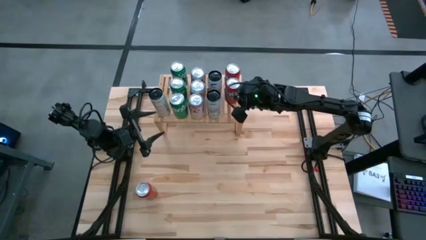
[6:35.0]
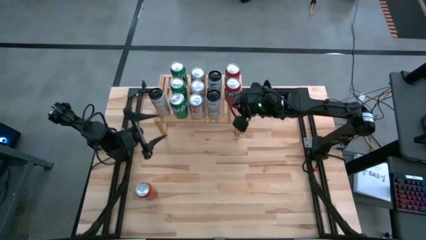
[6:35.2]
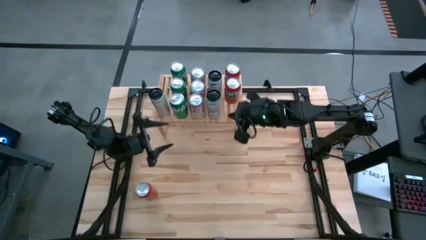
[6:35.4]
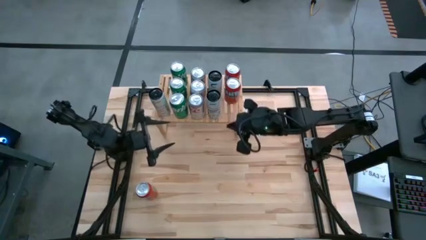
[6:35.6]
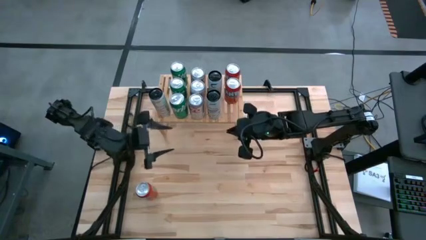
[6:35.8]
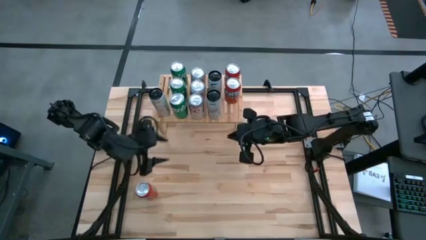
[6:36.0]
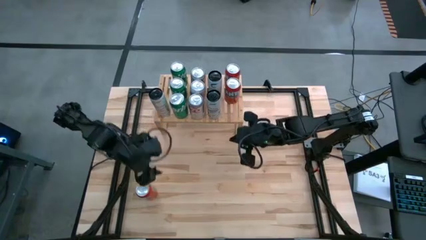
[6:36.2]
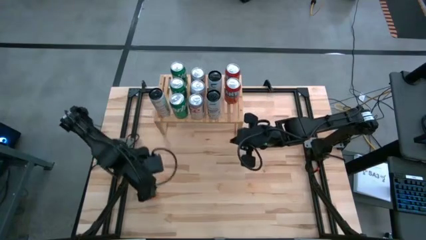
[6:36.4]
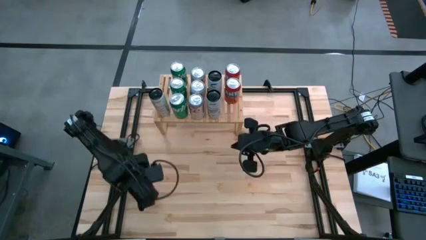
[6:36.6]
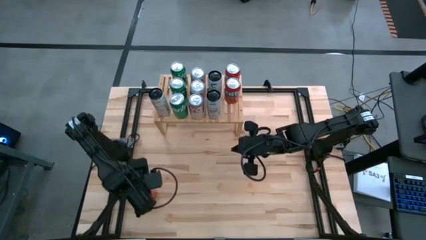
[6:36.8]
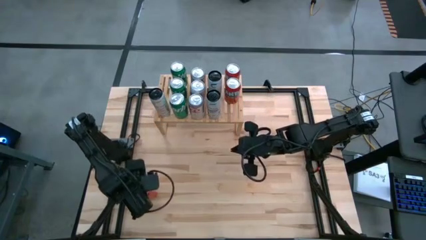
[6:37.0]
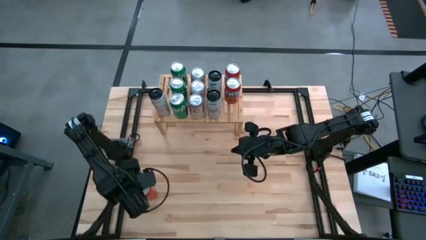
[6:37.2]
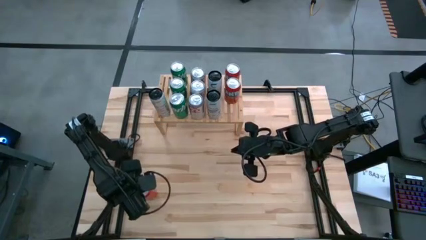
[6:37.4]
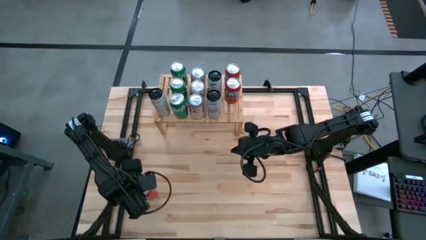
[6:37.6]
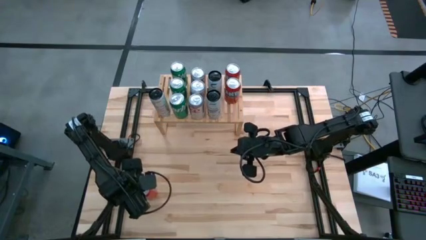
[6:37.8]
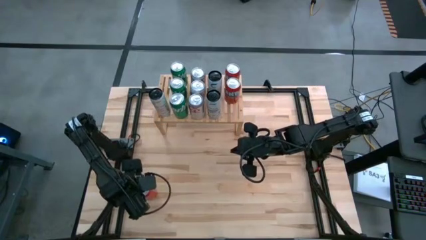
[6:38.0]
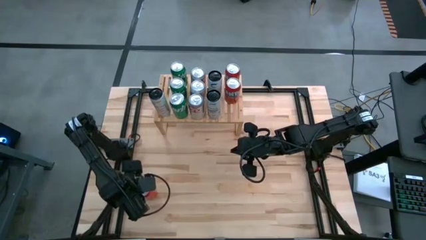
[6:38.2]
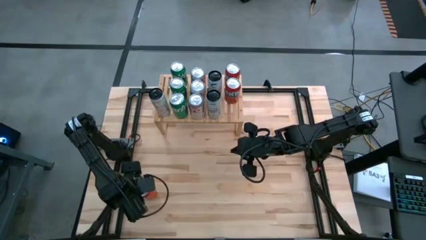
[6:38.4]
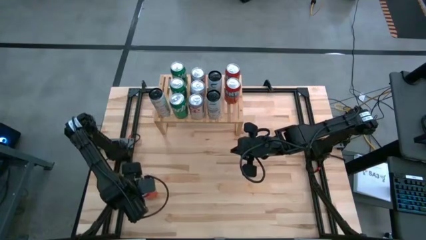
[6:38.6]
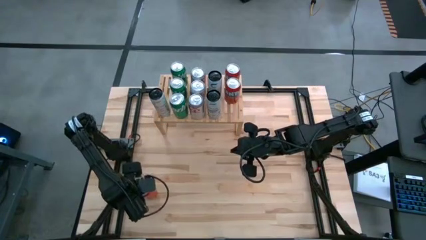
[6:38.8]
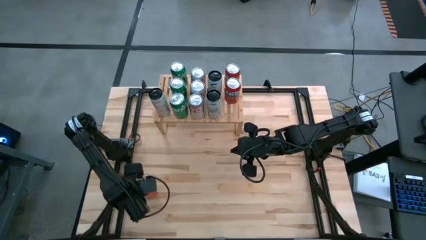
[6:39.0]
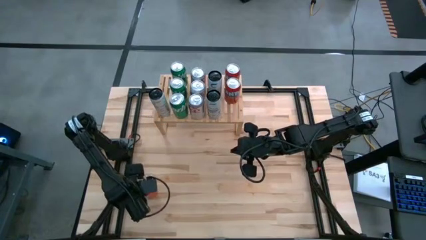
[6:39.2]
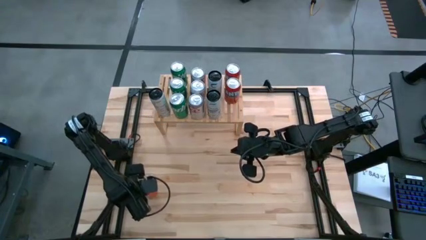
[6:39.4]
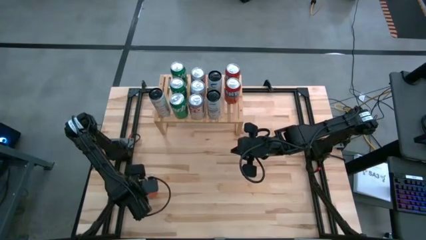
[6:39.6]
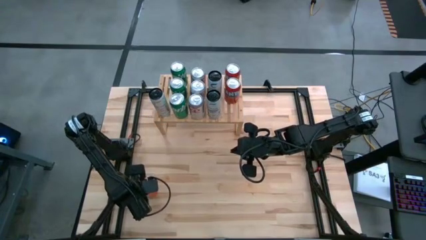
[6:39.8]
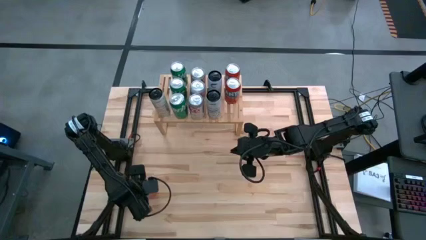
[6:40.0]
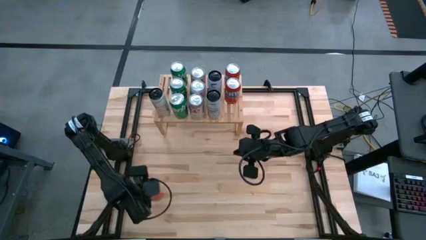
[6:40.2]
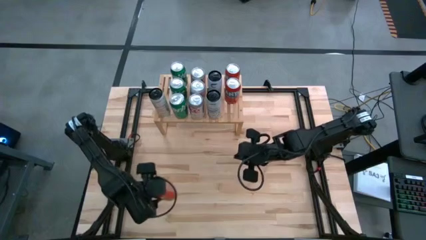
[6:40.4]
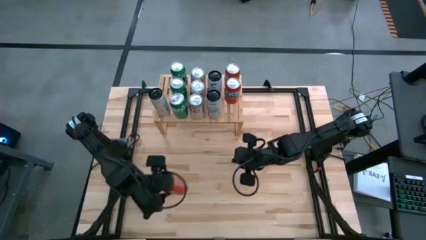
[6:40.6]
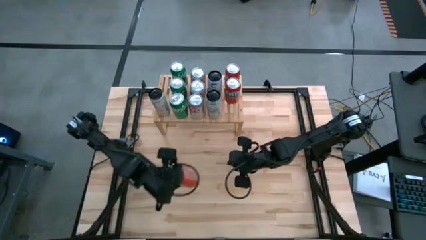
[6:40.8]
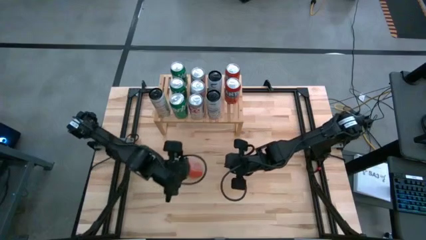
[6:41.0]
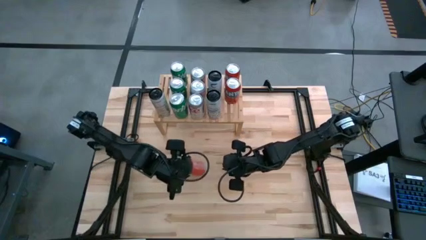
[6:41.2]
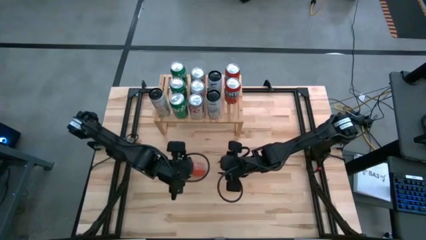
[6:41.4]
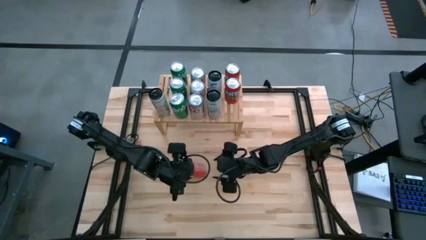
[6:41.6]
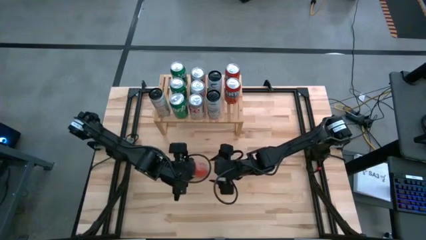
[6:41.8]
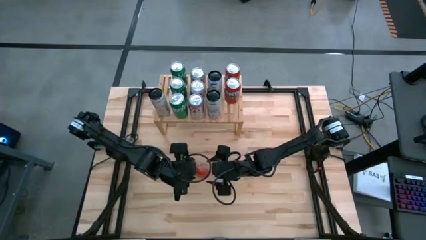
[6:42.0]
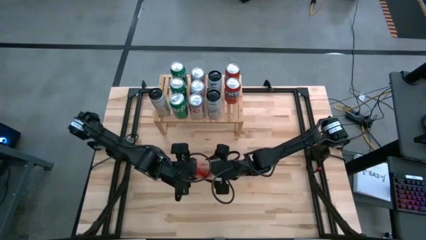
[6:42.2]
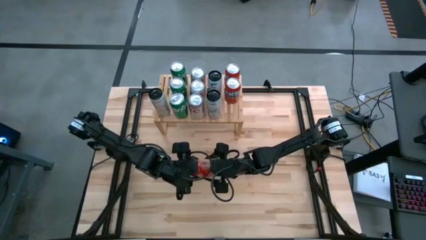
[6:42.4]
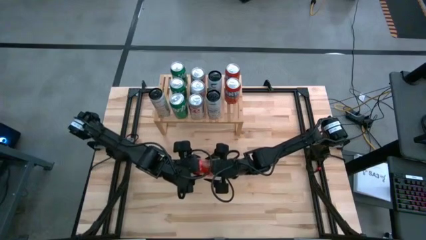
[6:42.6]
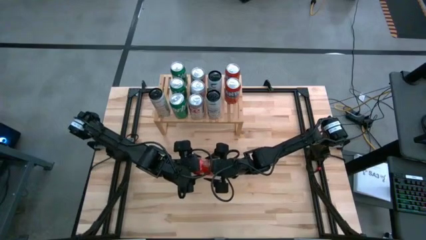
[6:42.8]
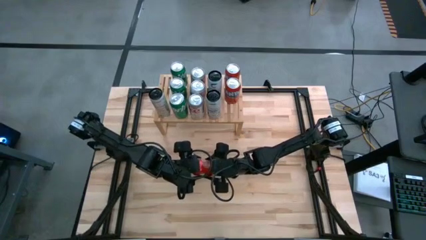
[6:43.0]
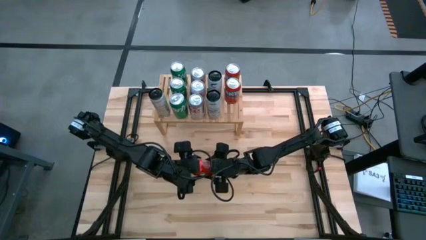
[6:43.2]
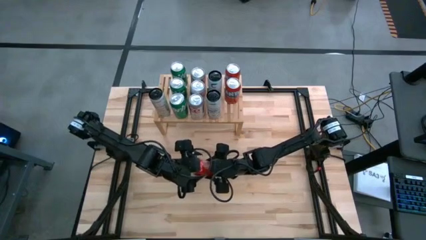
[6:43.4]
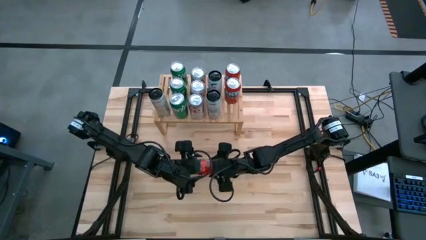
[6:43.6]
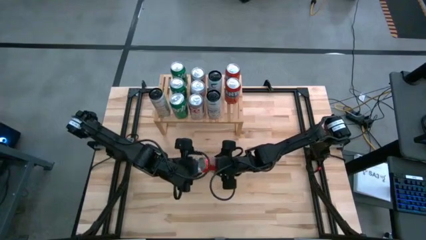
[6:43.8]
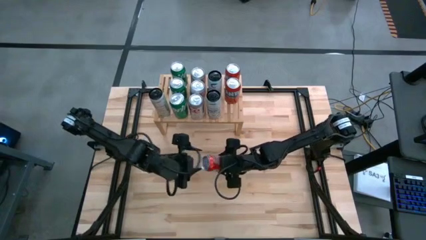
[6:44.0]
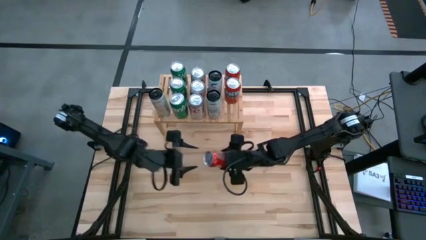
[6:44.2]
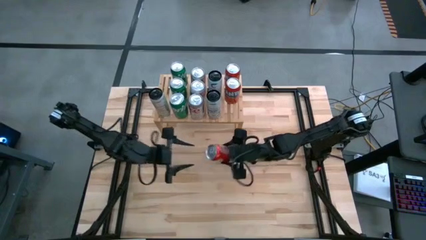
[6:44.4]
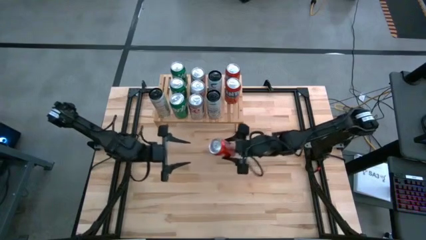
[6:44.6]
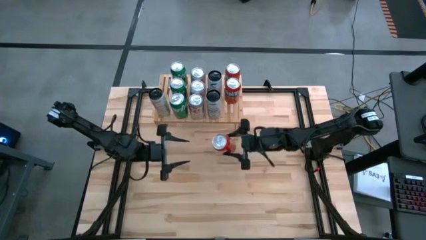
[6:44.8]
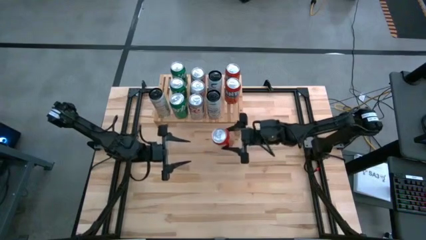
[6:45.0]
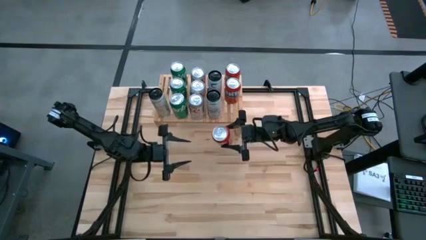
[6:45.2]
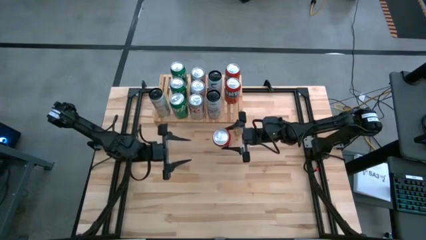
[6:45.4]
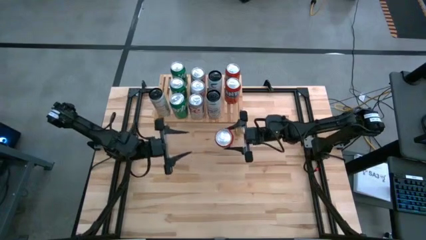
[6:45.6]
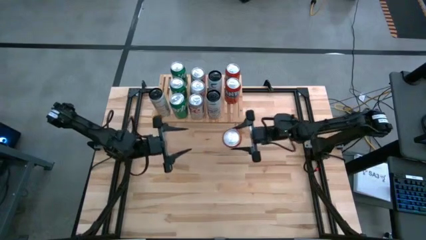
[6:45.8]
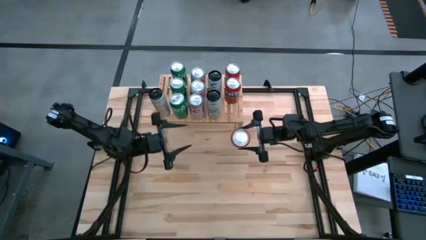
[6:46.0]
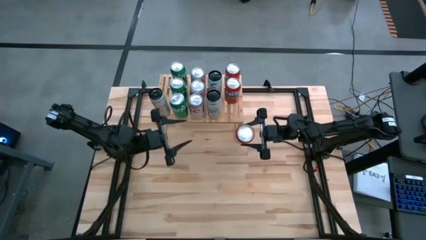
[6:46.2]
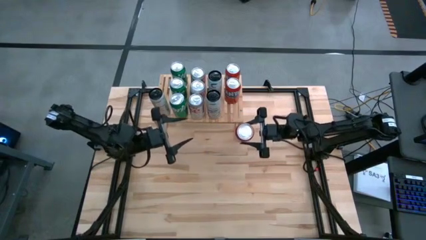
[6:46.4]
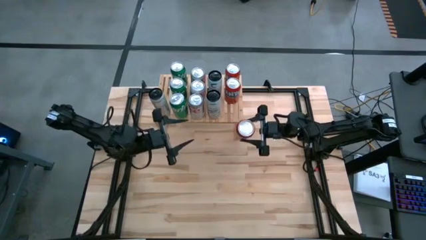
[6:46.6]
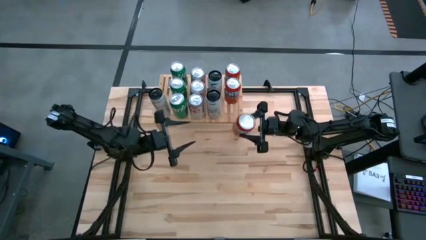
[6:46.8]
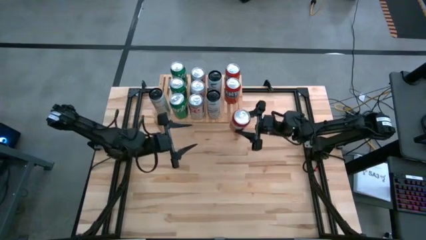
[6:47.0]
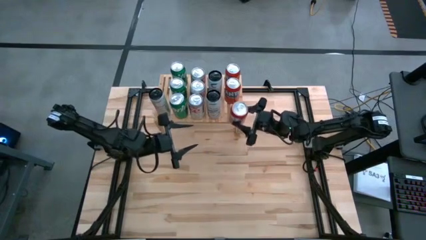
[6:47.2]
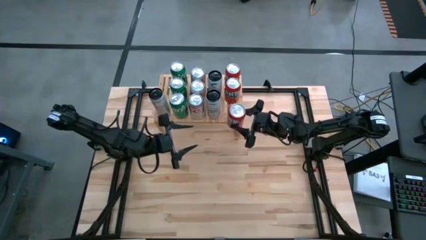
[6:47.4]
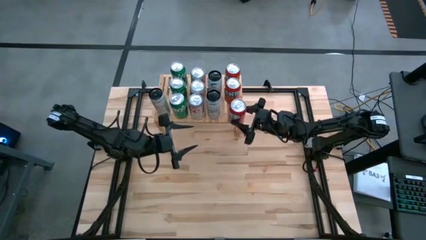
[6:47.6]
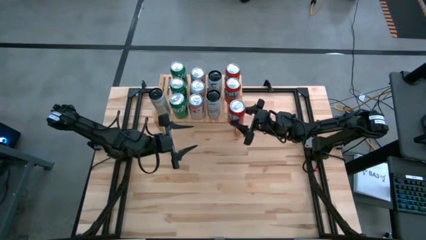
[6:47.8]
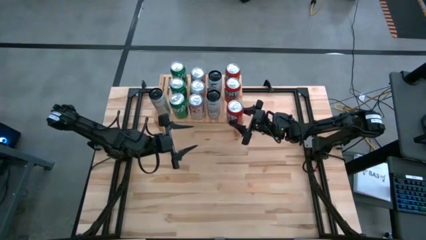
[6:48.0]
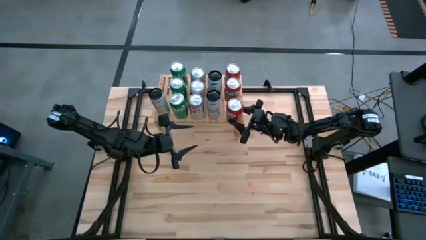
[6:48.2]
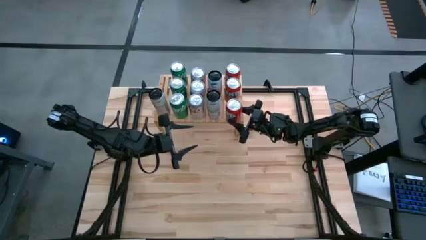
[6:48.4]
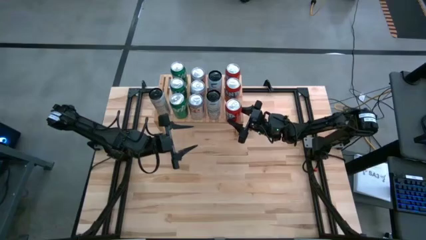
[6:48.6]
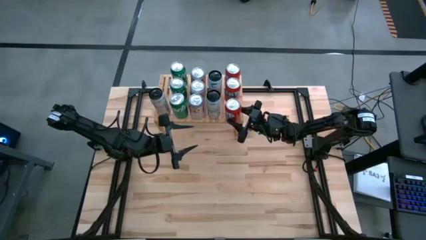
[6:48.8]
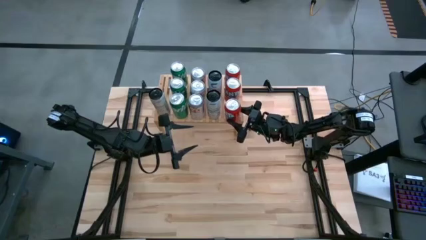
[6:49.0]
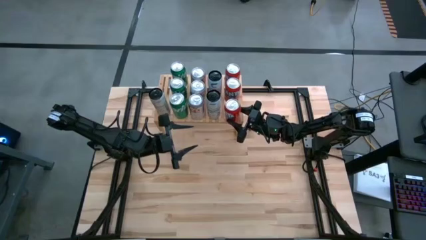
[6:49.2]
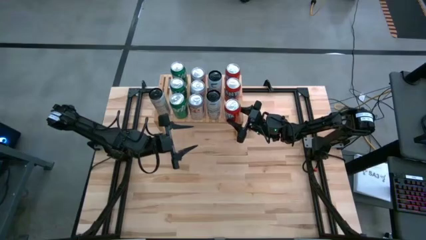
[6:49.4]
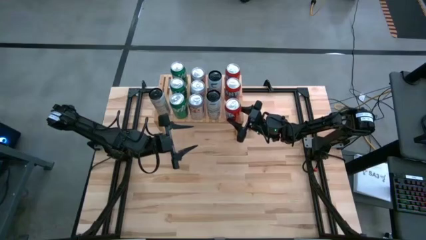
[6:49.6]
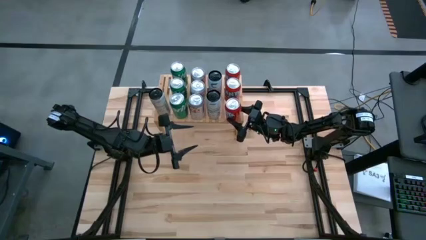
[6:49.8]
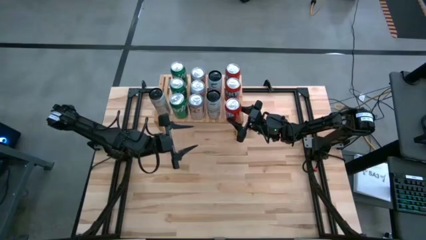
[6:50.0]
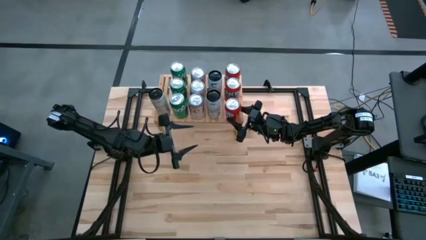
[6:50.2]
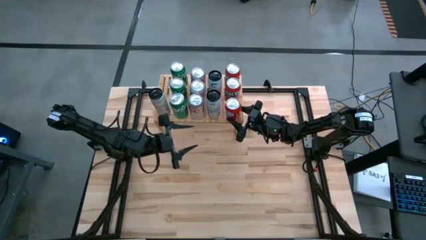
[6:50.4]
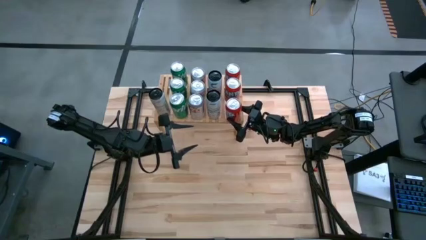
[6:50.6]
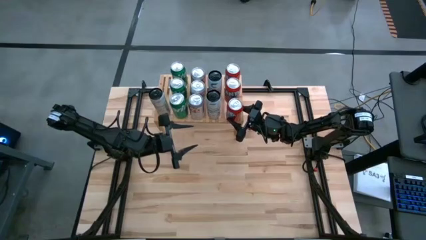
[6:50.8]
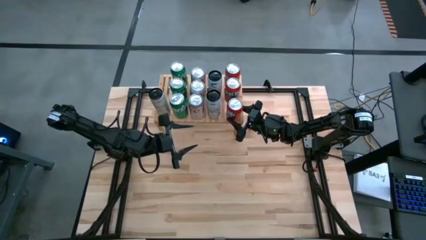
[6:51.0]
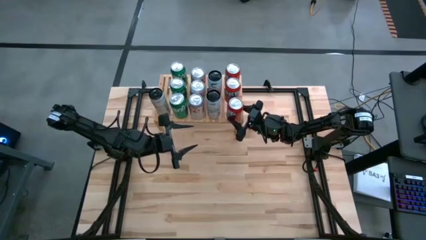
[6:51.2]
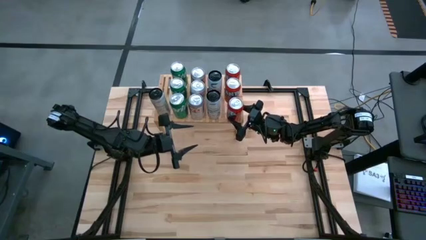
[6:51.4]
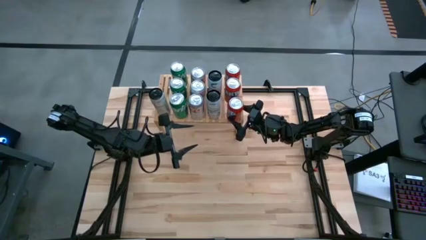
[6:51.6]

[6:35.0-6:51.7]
Task: Place canned beverage on shelf
Put the orange soda can on the shelf
